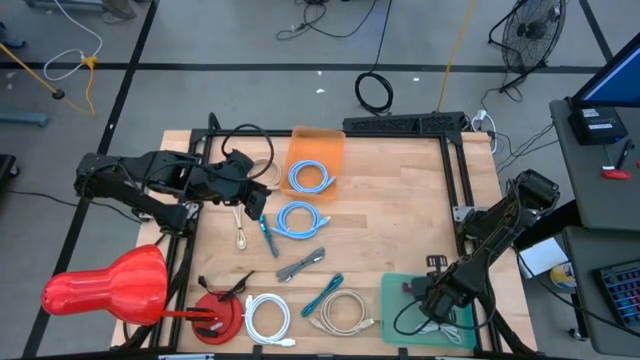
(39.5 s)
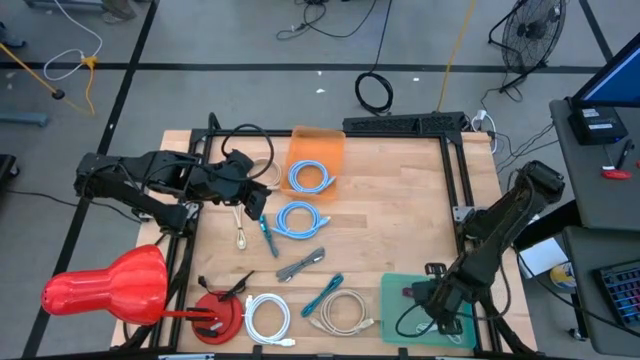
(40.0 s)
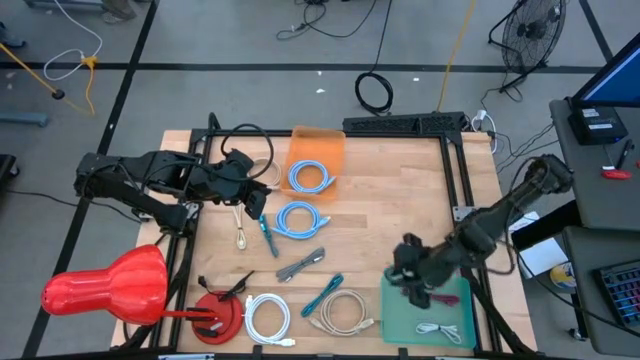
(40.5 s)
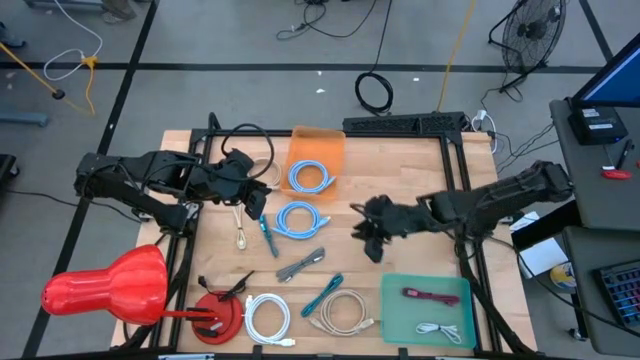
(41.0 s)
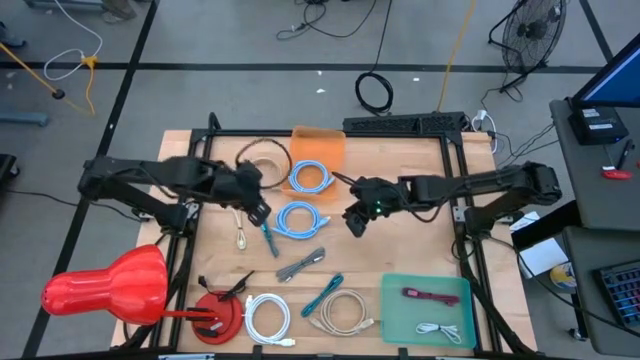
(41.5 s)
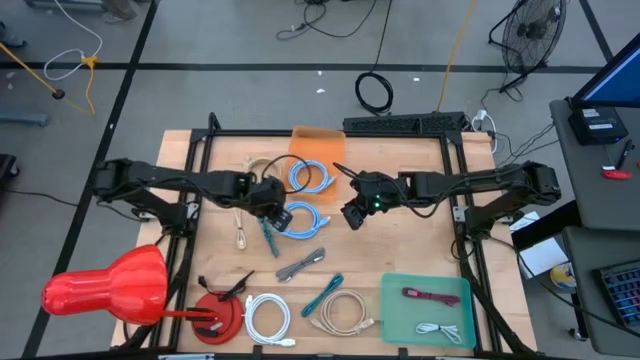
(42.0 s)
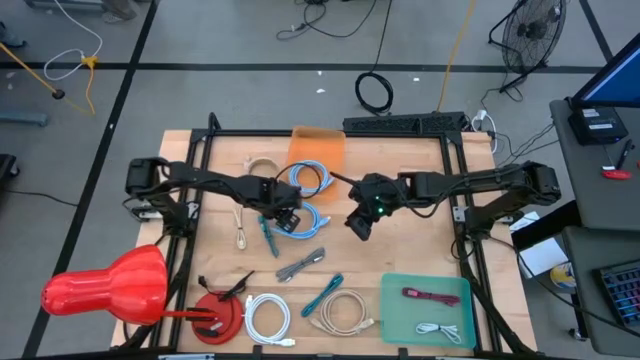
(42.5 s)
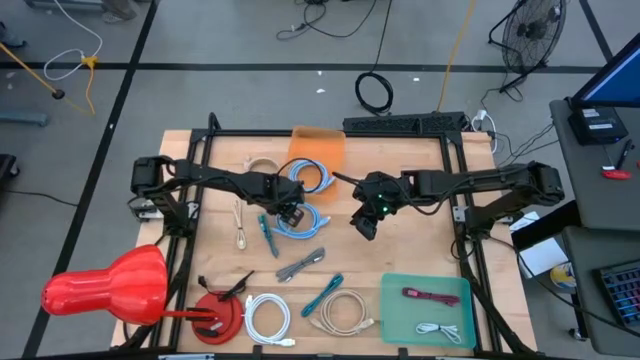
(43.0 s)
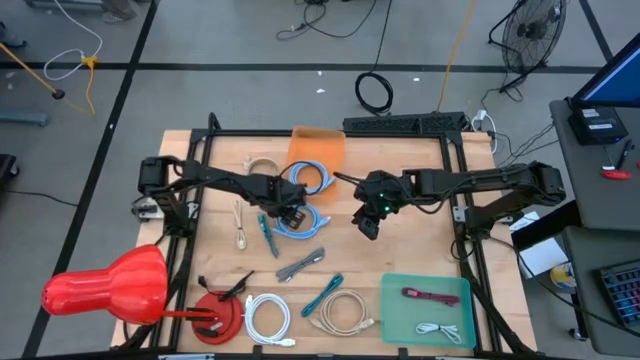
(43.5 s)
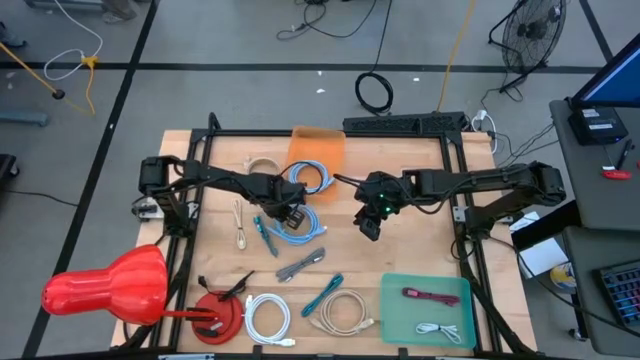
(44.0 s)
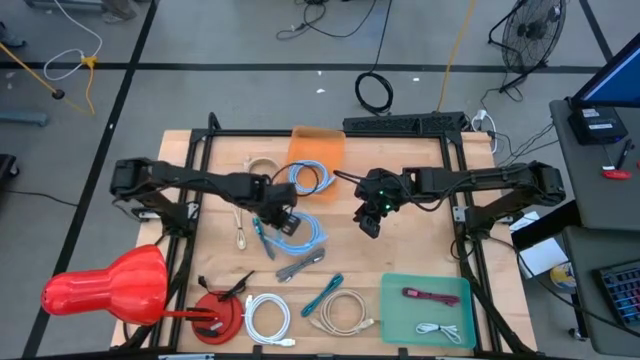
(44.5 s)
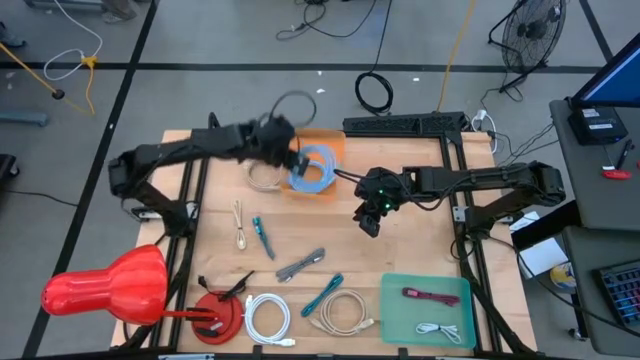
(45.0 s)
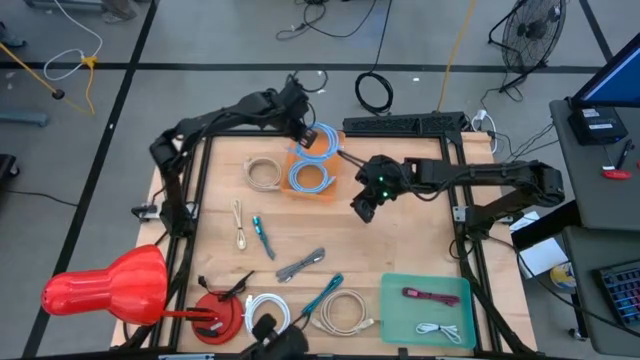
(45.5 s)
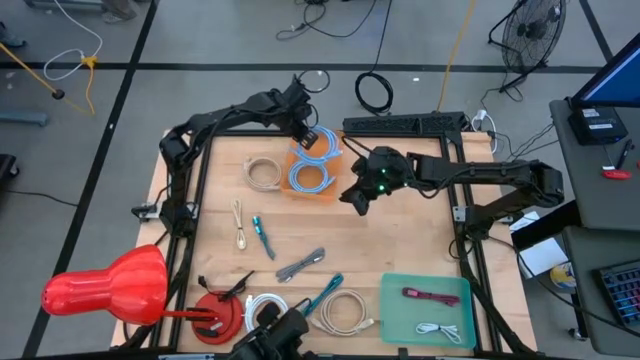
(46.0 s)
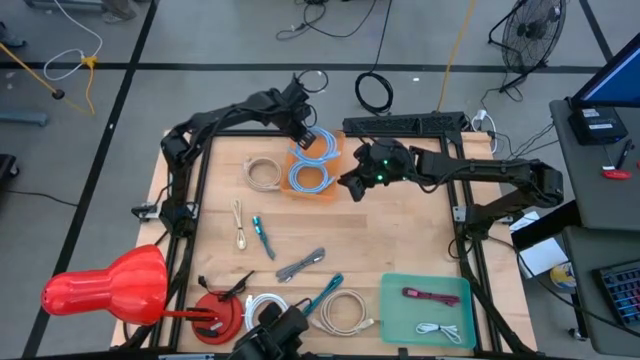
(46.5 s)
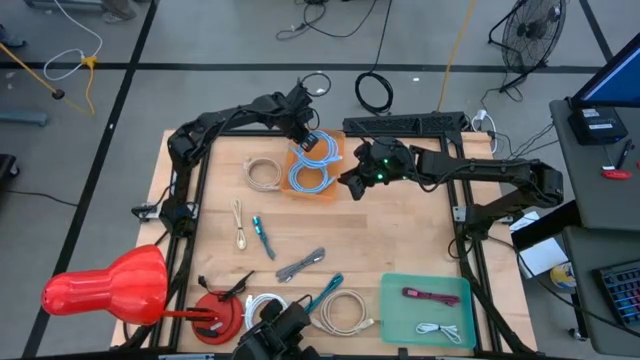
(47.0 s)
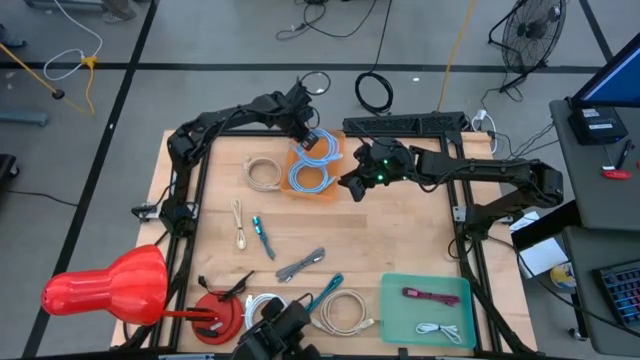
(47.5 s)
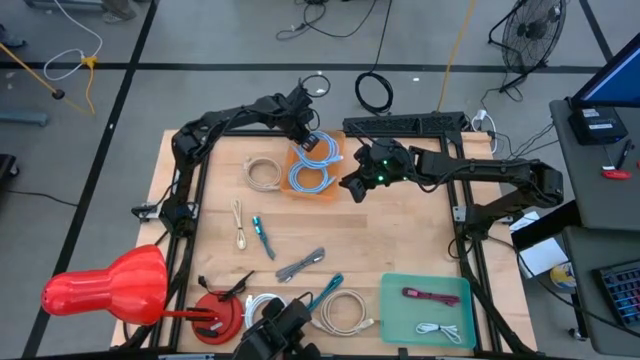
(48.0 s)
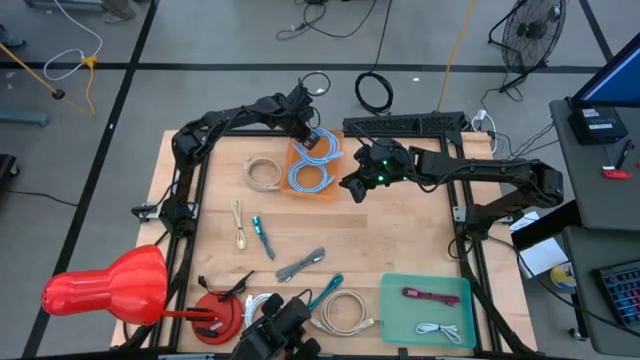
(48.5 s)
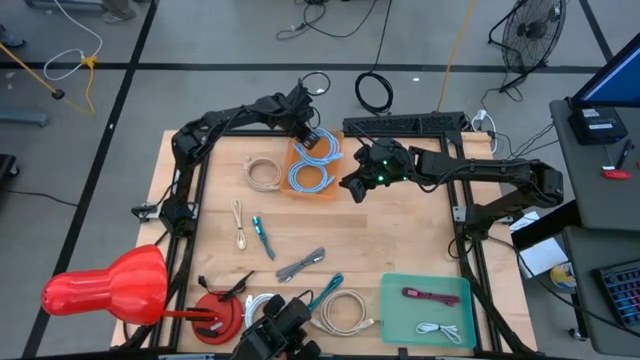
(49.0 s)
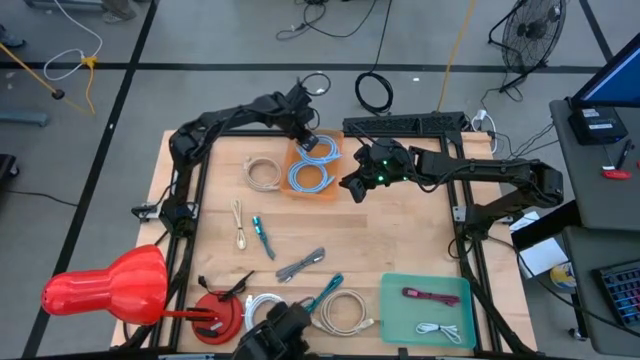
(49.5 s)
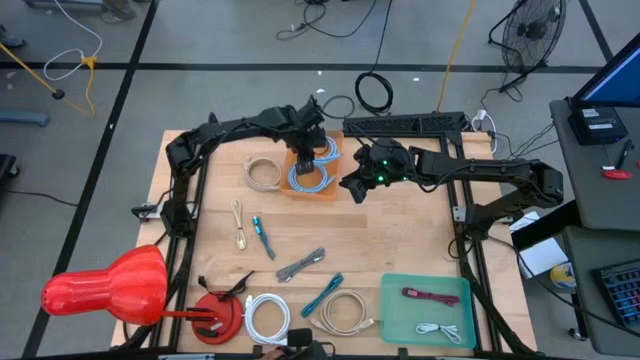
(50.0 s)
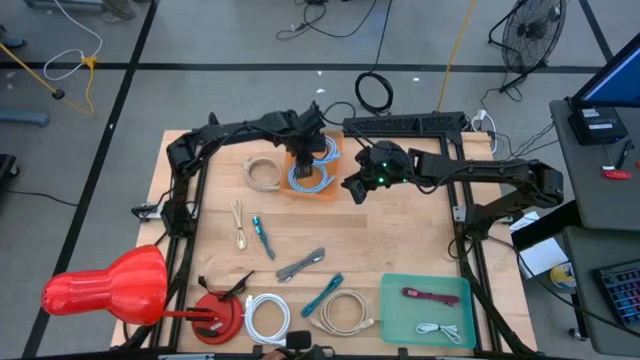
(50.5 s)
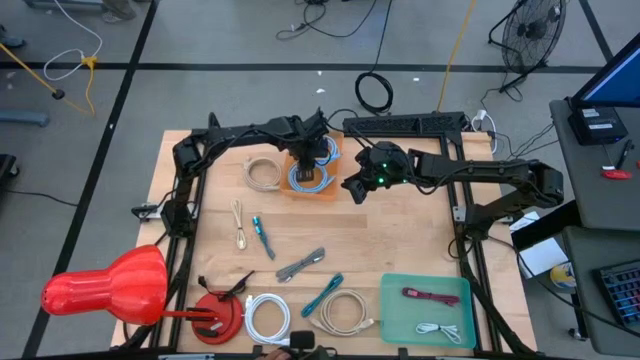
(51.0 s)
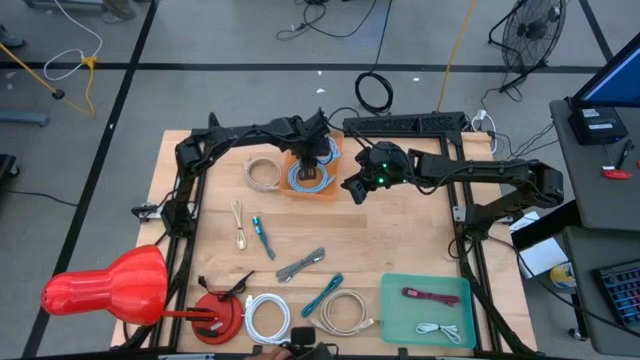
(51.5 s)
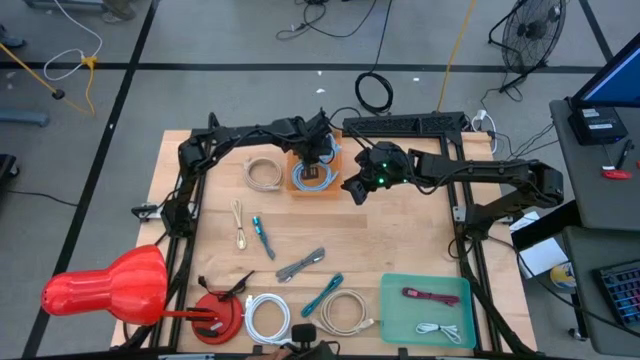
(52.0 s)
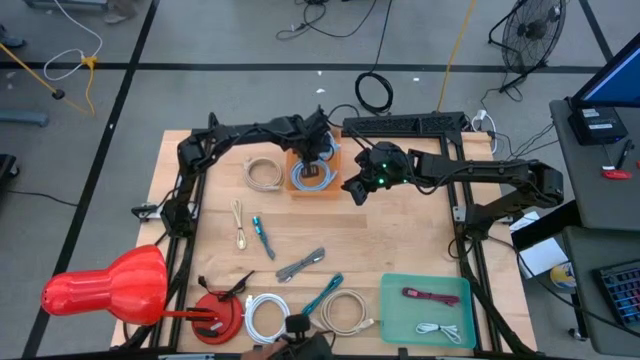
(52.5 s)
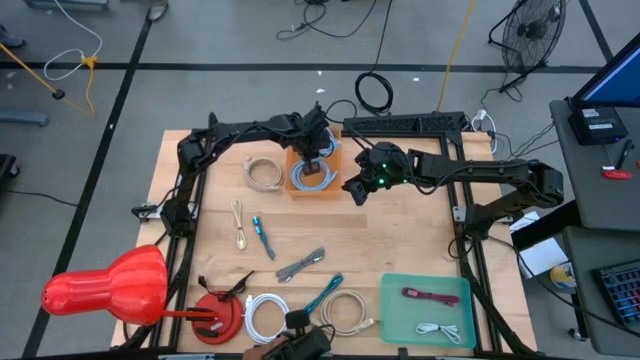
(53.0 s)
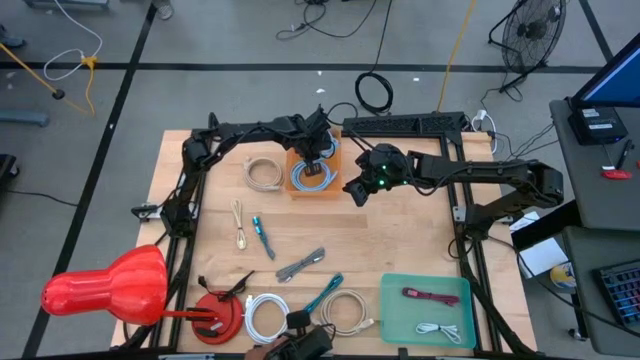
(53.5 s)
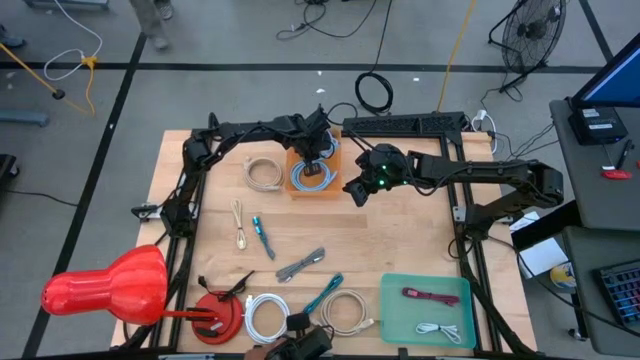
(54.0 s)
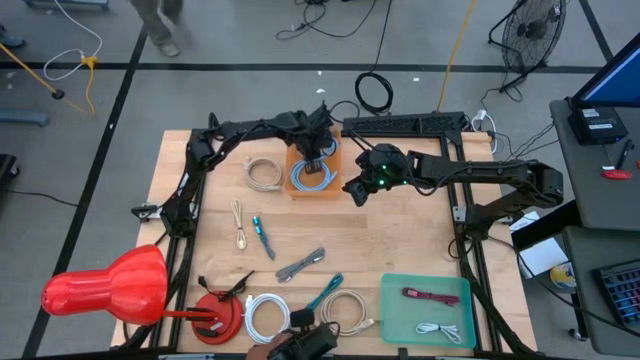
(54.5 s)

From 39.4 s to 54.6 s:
Task: Pick & Place USB Port
Put the blue usb cable into the orange bin
